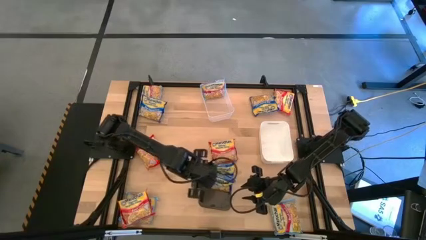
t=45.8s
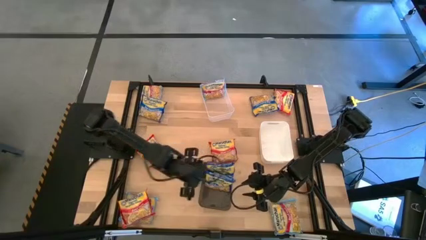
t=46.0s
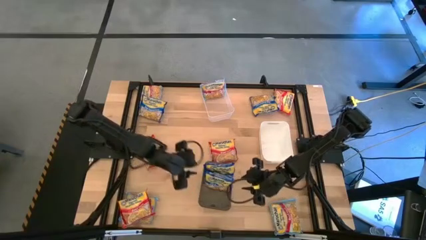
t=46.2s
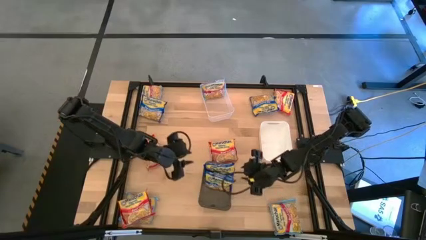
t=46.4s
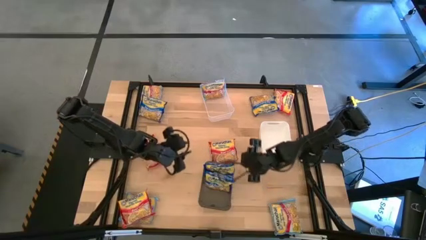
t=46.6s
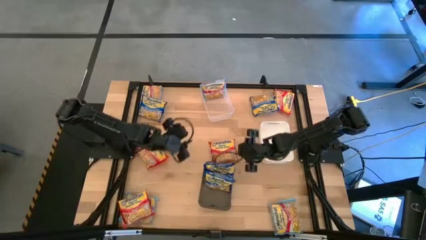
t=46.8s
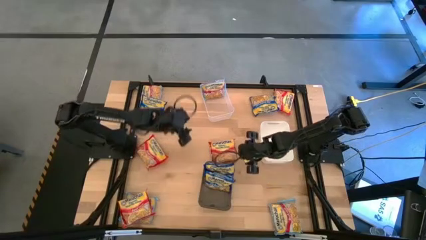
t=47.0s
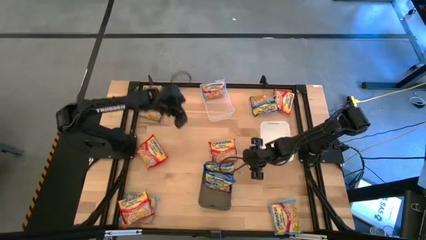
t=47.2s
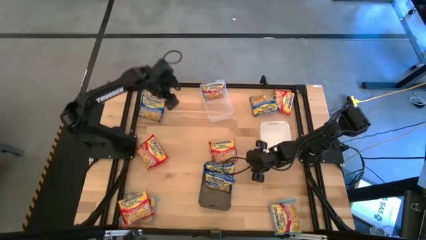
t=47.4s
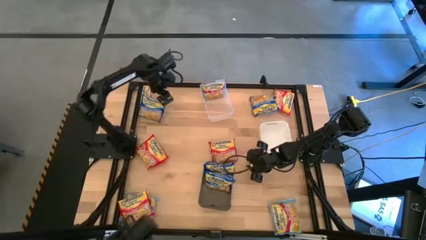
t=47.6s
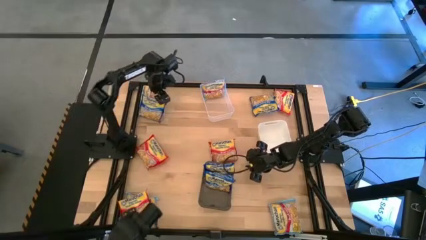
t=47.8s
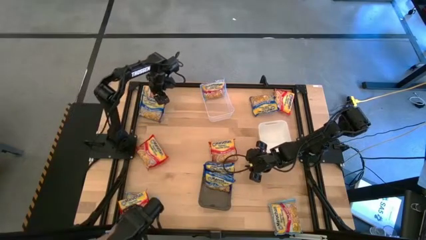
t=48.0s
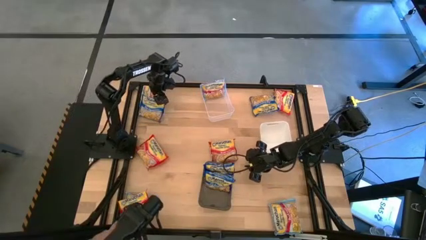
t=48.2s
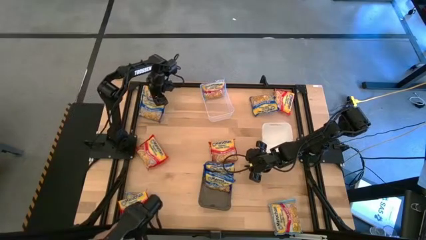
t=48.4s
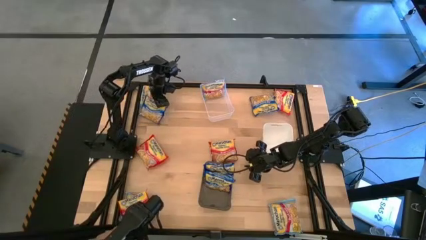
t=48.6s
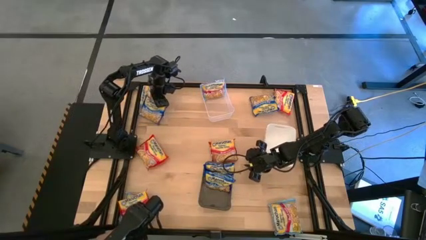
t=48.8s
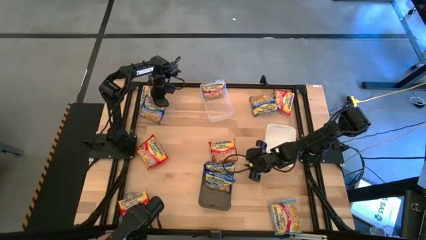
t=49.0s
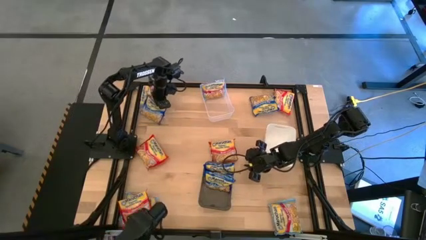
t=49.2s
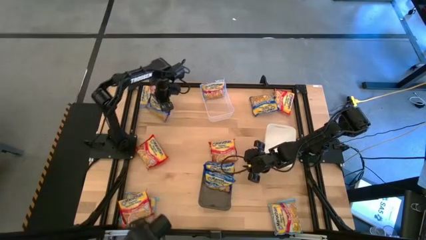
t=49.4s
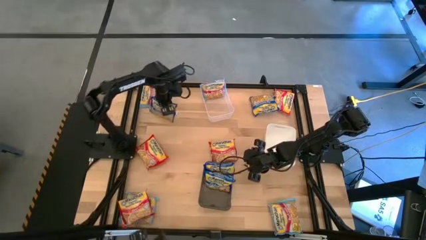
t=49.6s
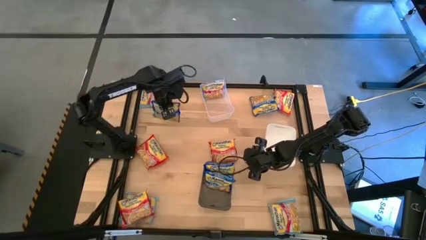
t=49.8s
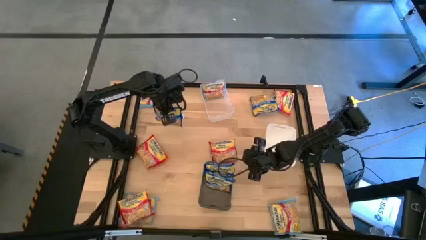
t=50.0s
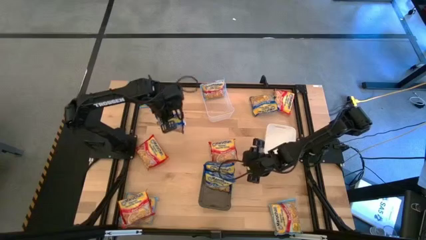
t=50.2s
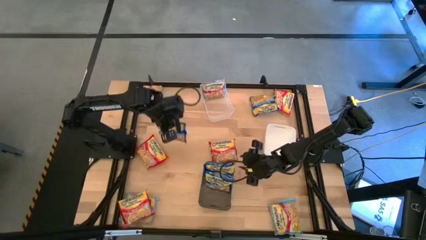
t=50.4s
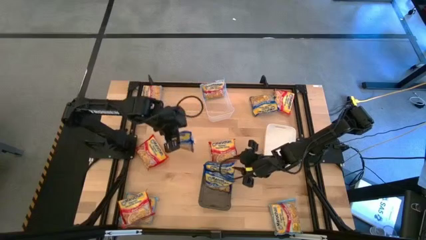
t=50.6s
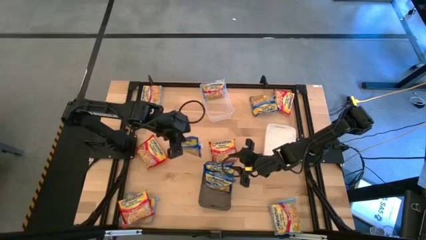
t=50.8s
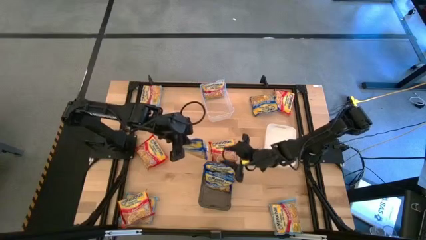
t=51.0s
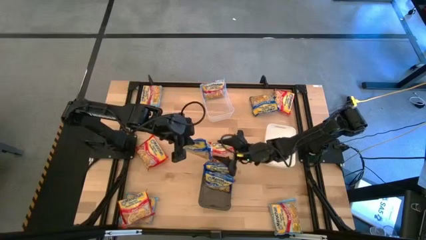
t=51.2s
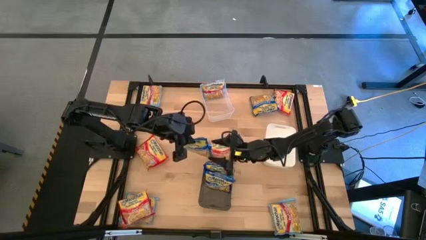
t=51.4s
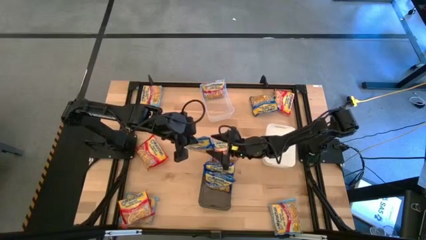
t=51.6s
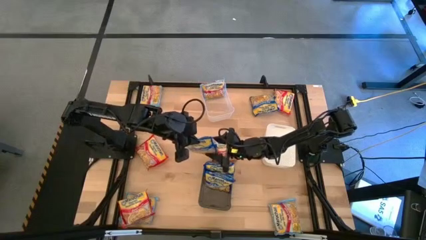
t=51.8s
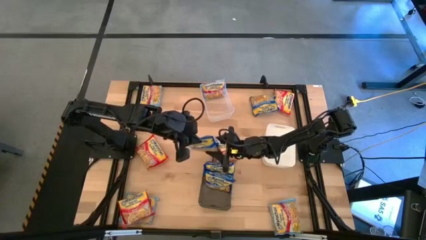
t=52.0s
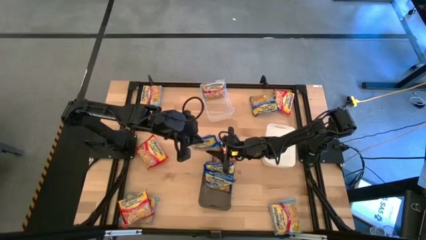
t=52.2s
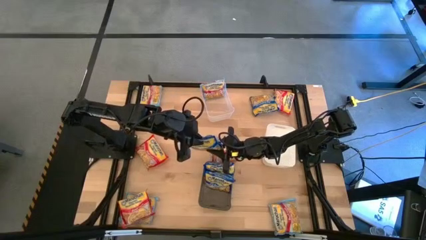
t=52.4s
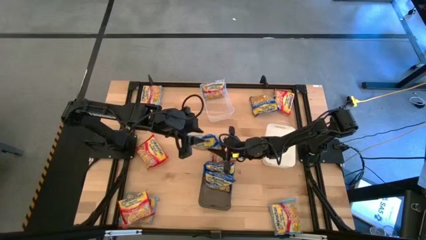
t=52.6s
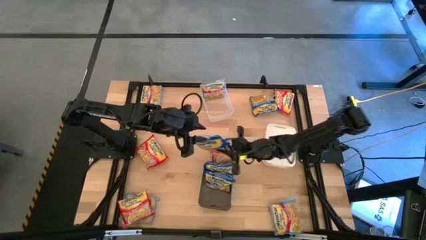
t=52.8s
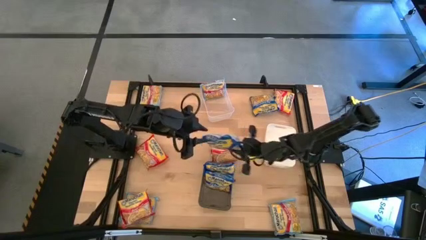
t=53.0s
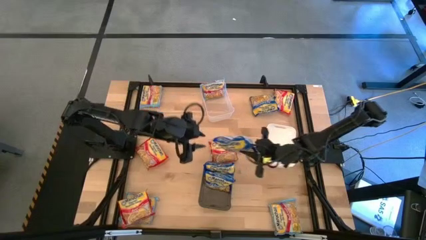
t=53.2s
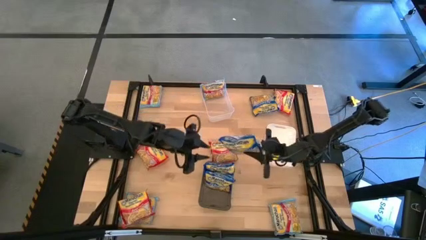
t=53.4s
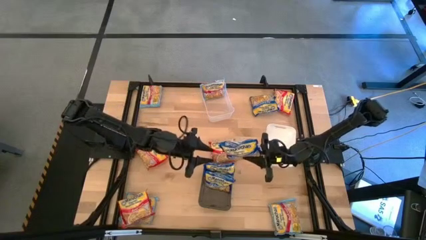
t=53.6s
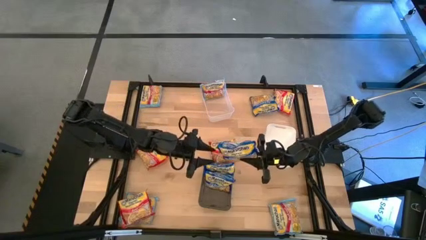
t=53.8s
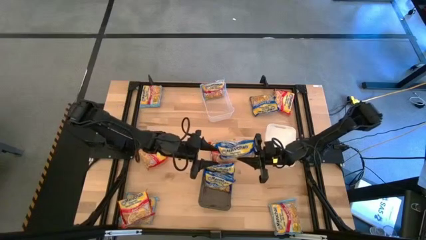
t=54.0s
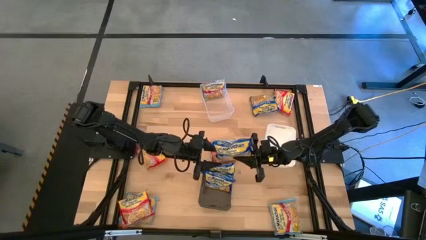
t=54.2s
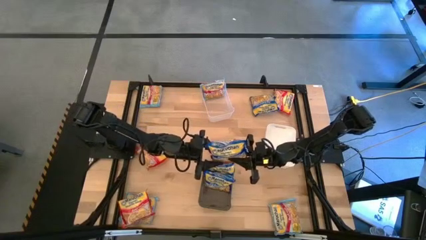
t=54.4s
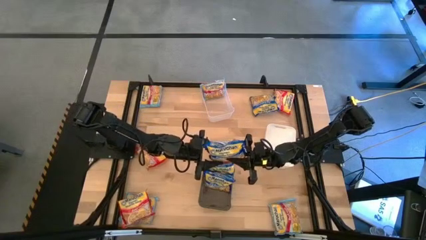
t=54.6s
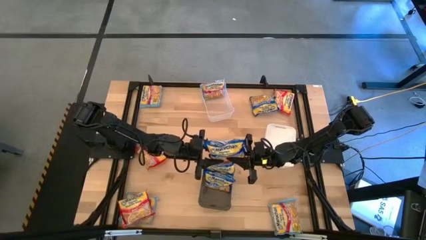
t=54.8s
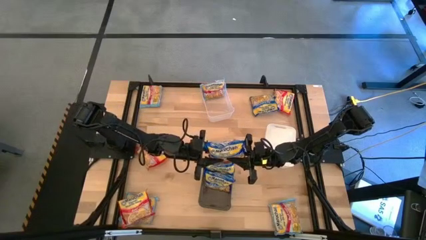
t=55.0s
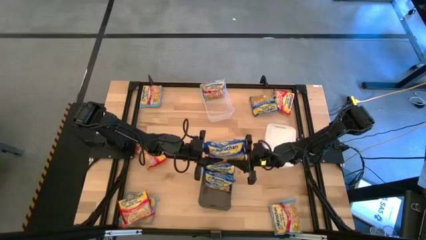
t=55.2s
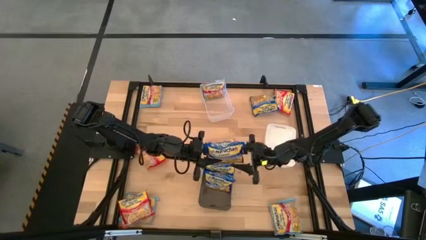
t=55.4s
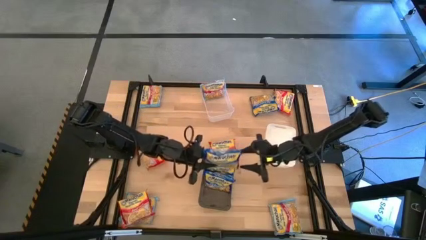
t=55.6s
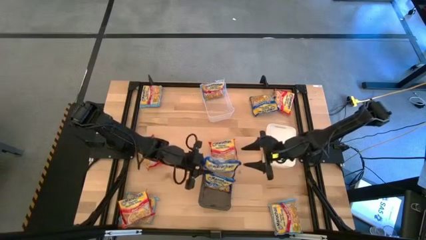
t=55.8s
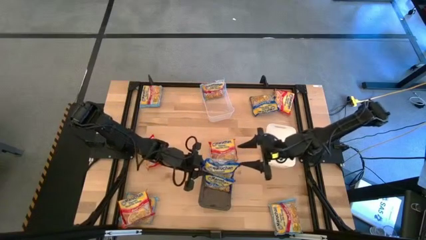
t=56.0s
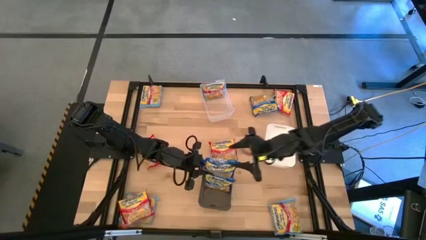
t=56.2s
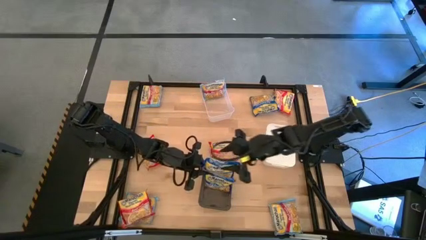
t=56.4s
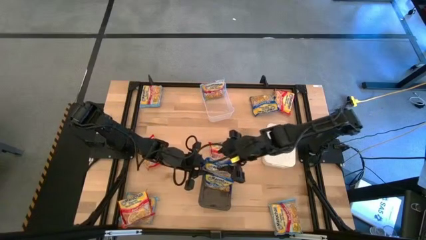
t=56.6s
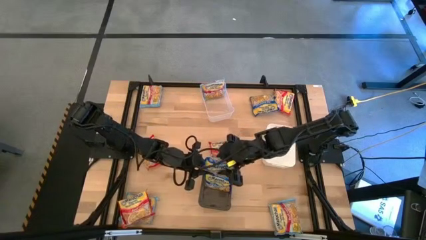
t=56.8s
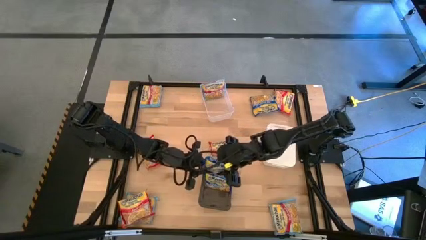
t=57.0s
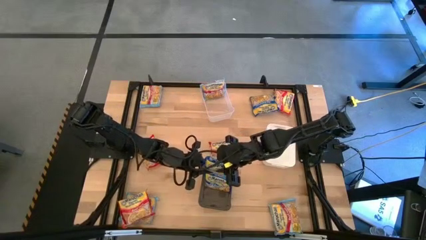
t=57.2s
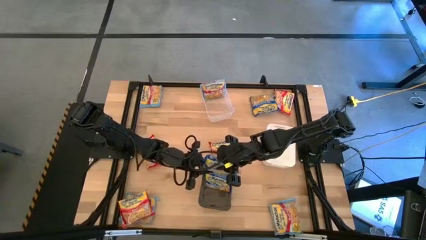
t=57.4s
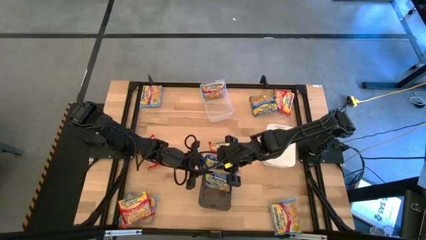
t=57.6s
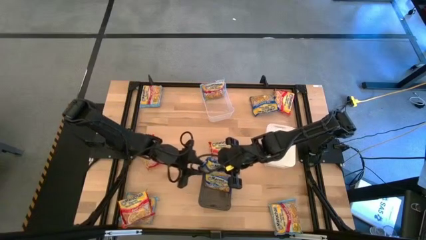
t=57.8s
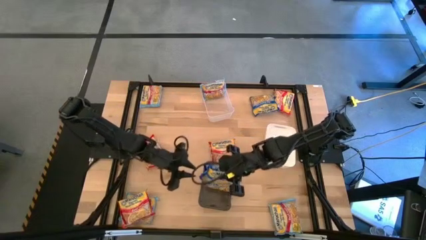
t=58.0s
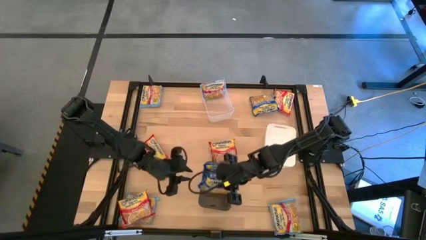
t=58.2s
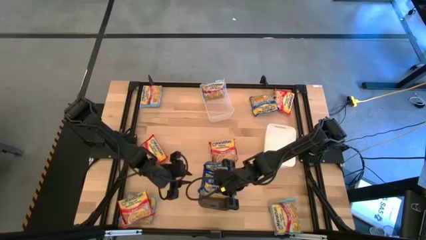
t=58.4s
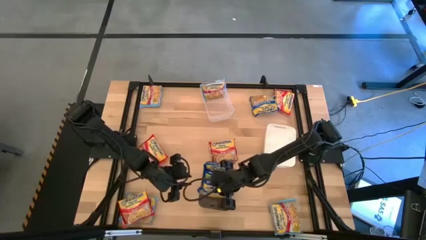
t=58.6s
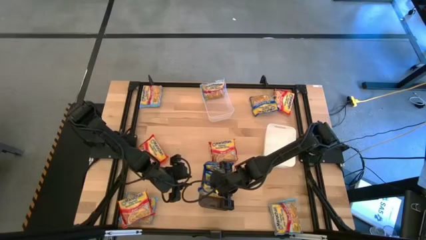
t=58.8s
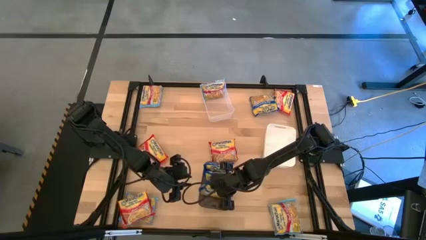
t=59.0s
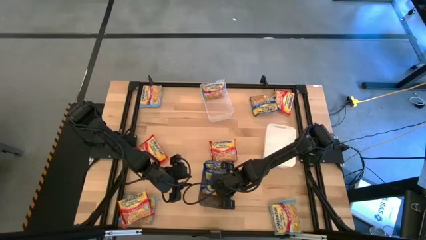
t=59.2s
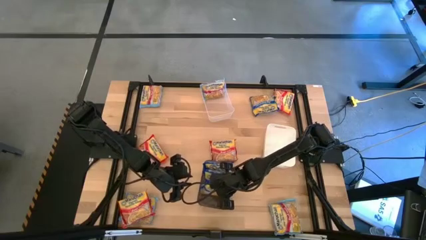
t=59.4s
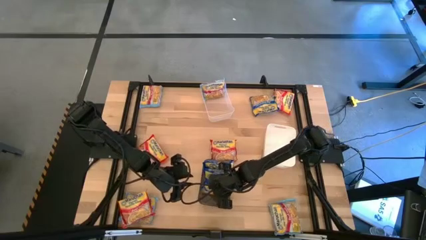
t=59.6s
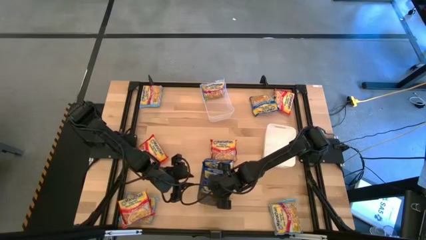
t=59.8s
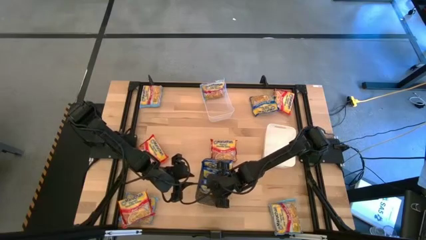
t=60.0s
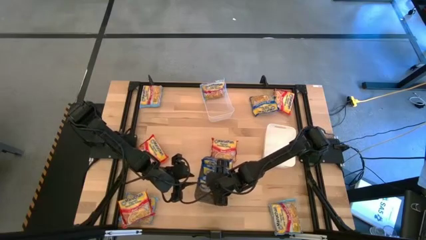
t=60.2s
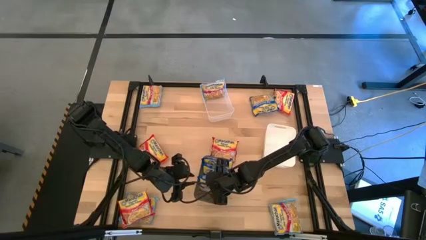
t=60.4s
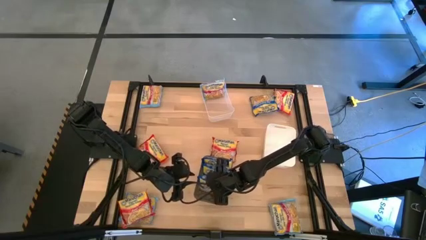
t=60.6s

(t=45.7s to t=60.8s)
Task: Sort Maruchan noodles
Put the top left blue noodle pack into the black bin
